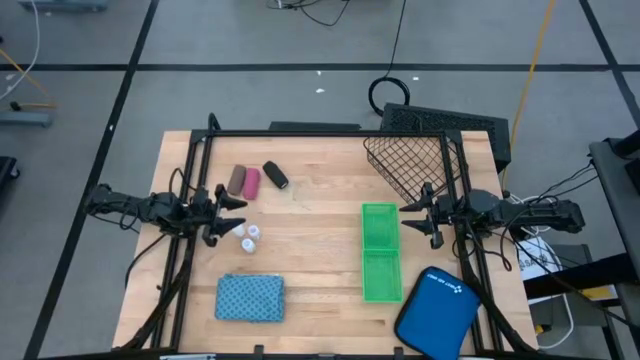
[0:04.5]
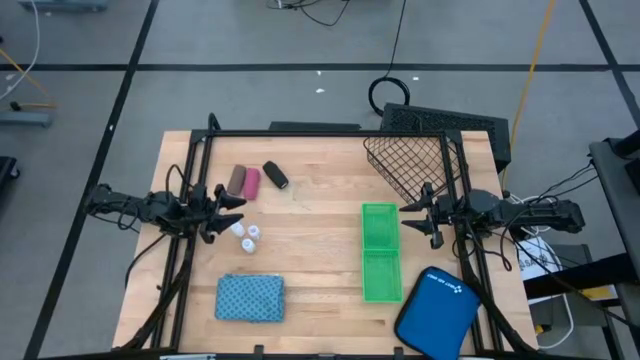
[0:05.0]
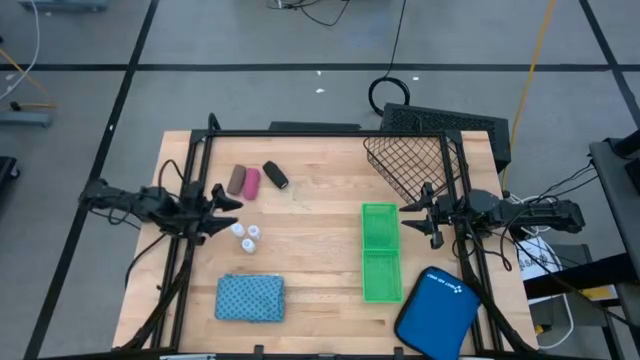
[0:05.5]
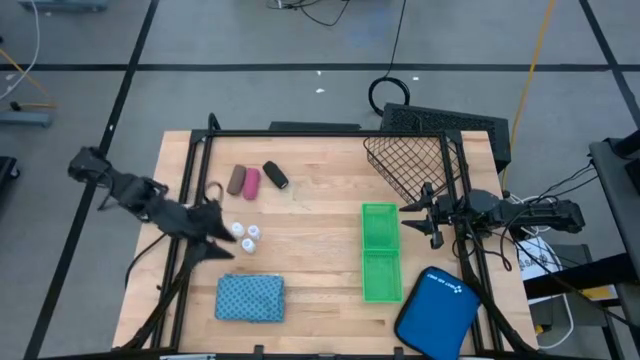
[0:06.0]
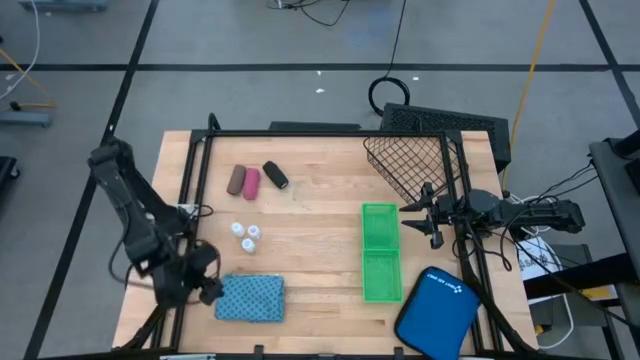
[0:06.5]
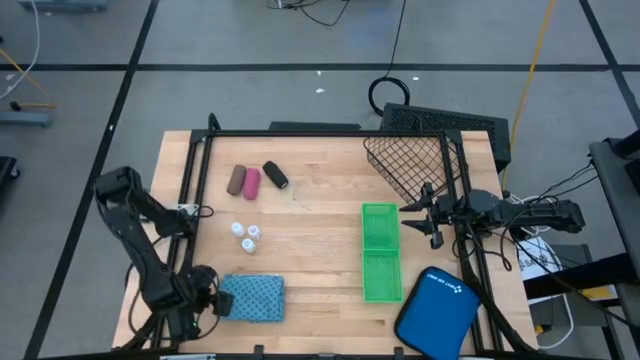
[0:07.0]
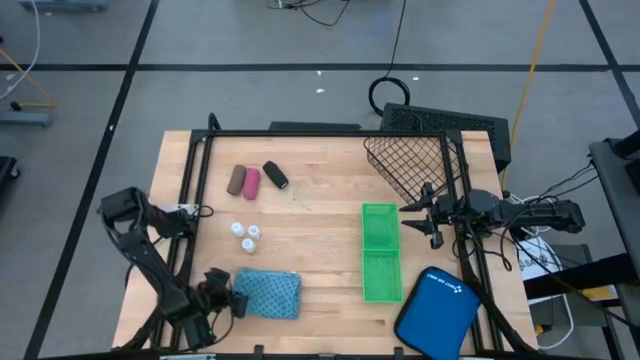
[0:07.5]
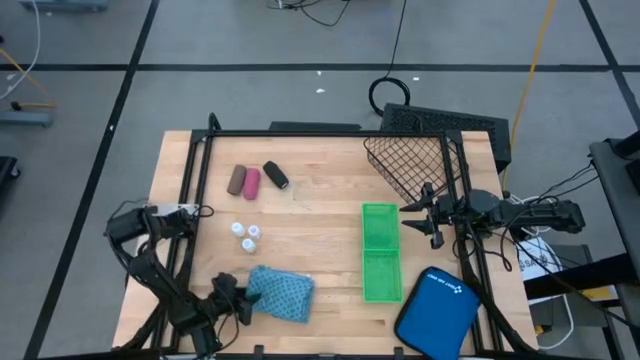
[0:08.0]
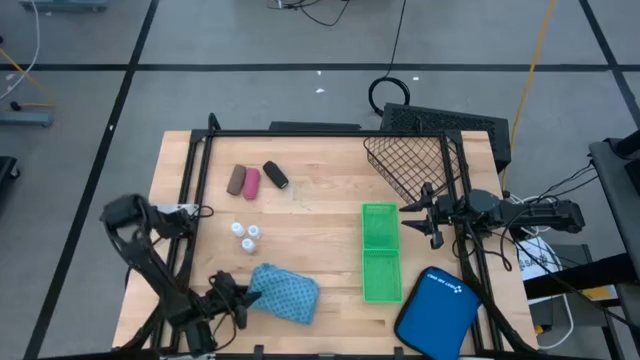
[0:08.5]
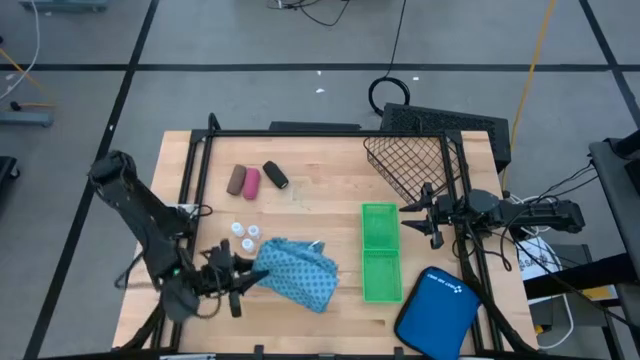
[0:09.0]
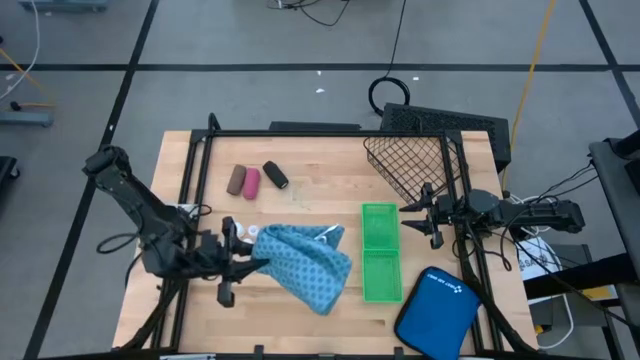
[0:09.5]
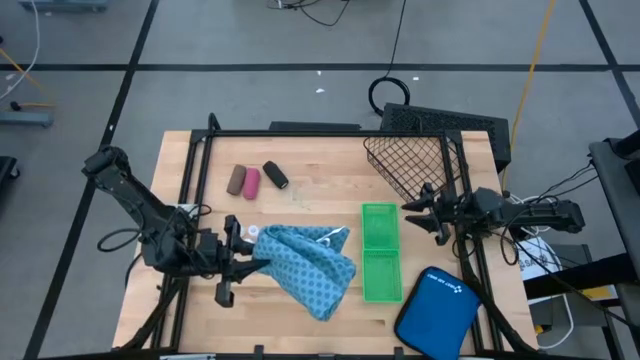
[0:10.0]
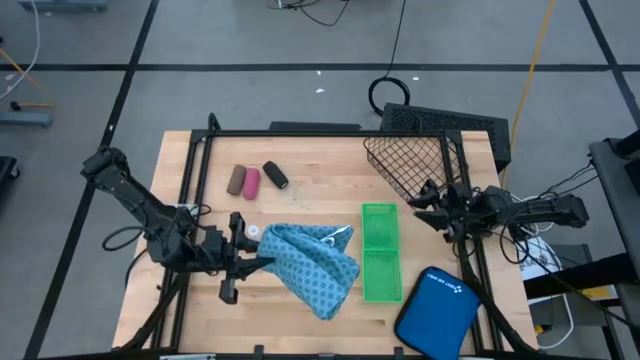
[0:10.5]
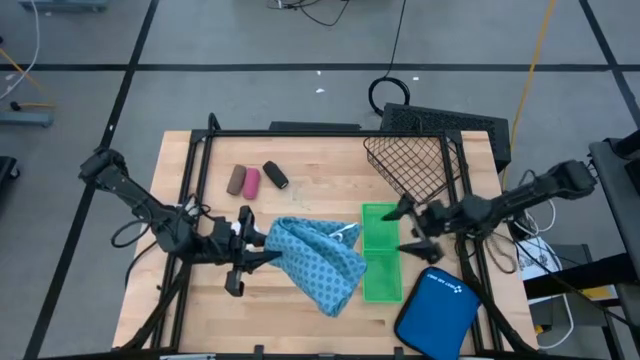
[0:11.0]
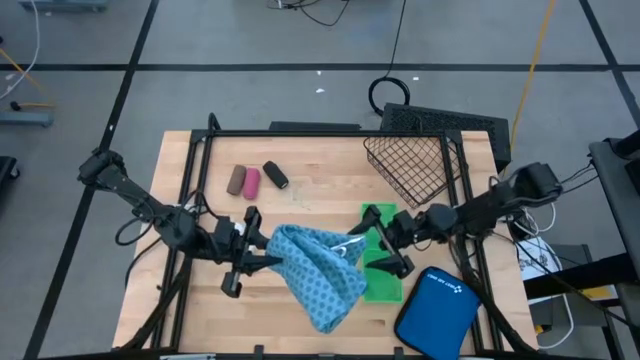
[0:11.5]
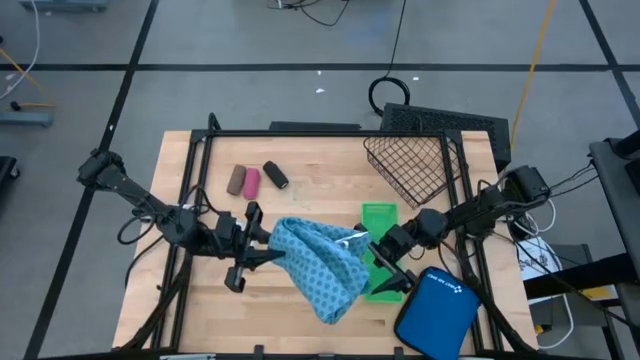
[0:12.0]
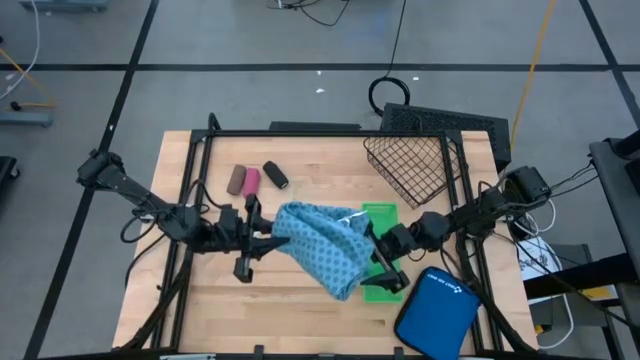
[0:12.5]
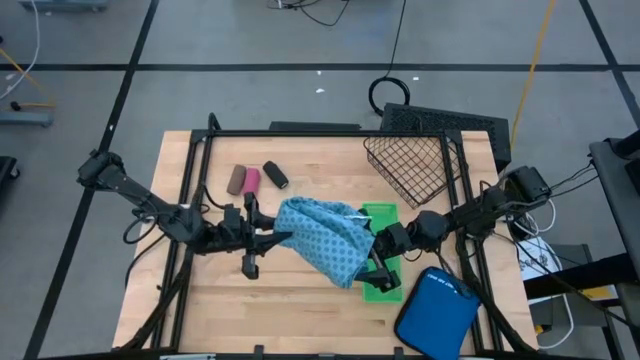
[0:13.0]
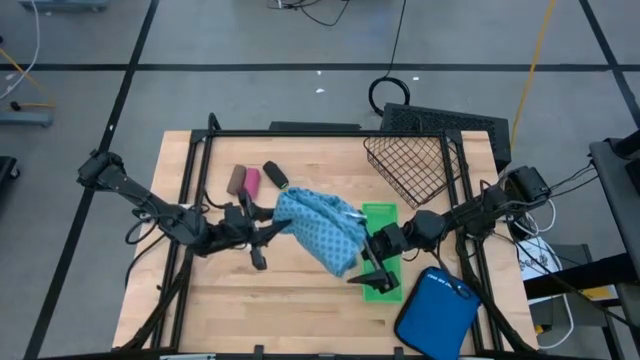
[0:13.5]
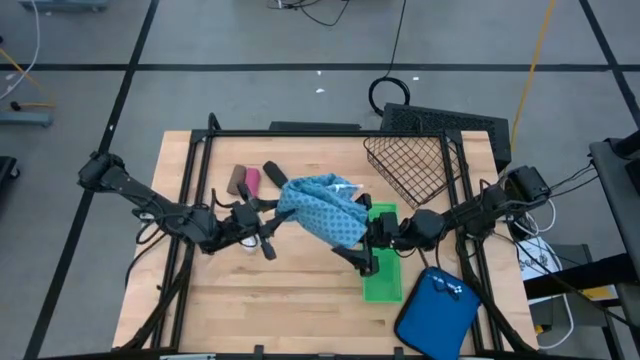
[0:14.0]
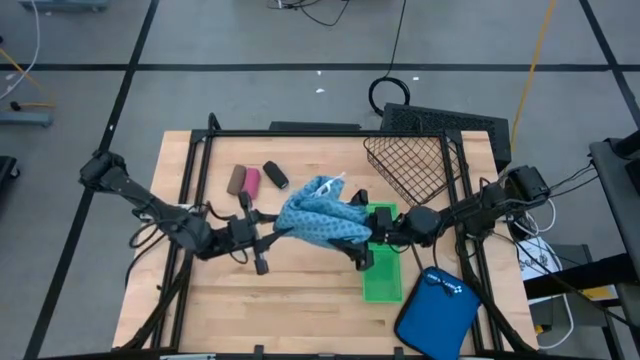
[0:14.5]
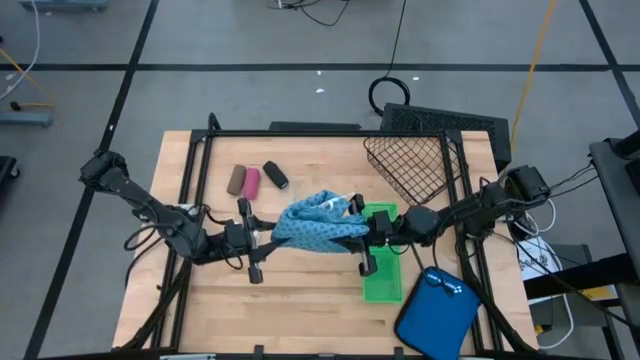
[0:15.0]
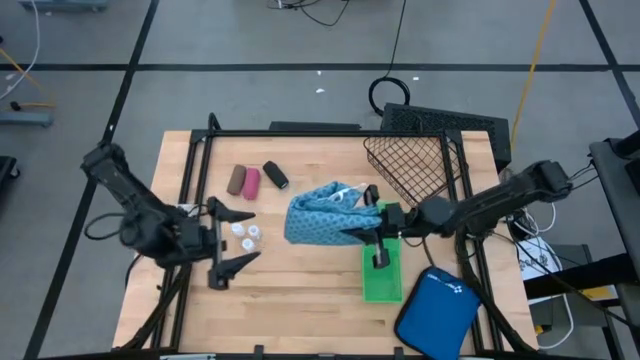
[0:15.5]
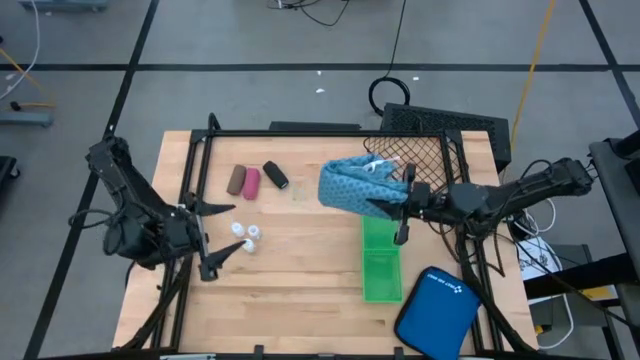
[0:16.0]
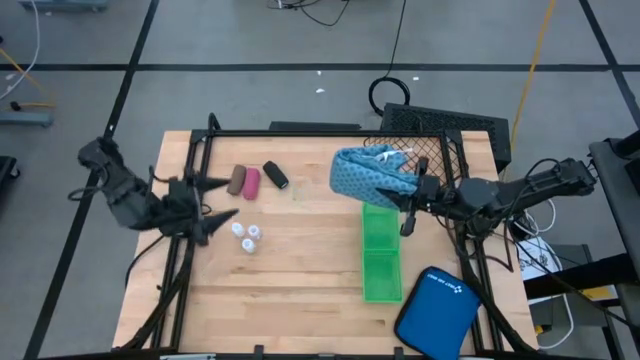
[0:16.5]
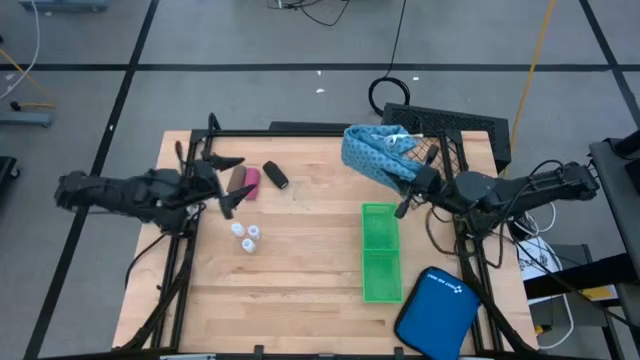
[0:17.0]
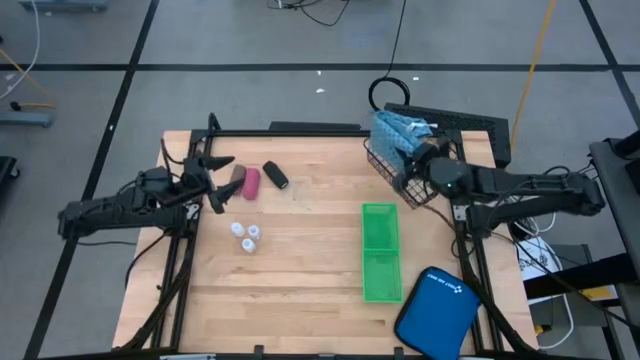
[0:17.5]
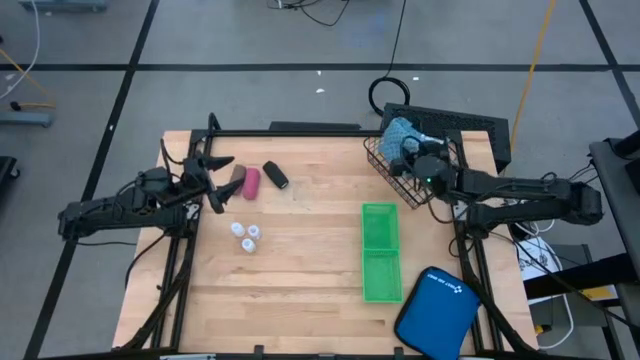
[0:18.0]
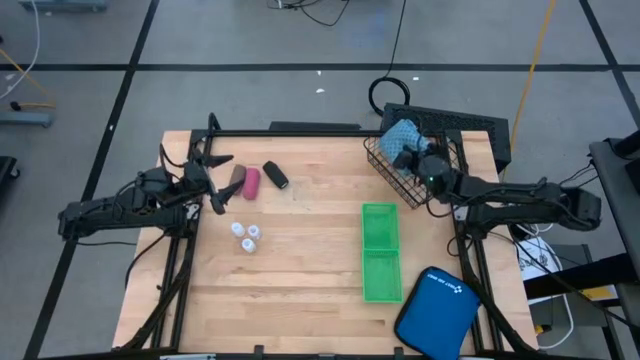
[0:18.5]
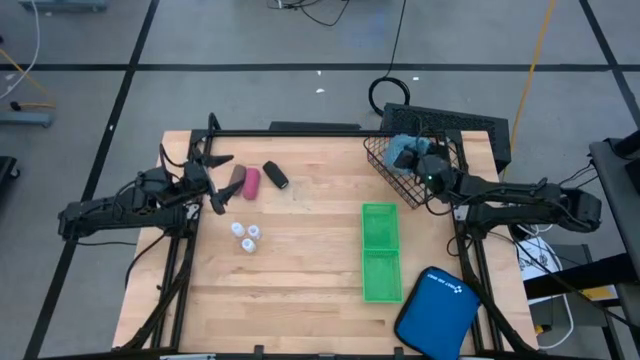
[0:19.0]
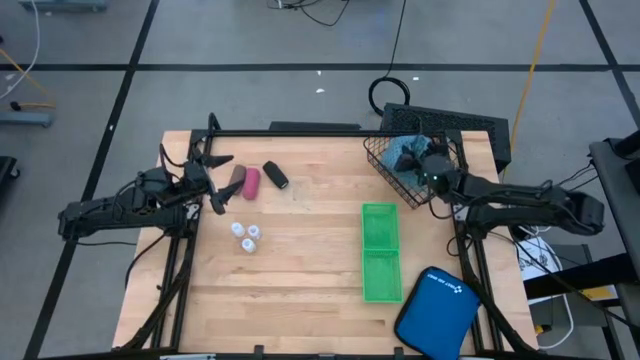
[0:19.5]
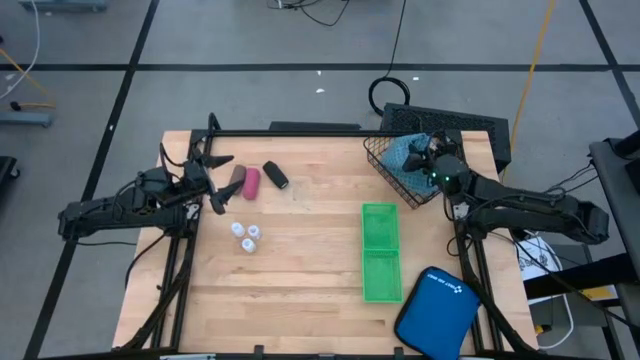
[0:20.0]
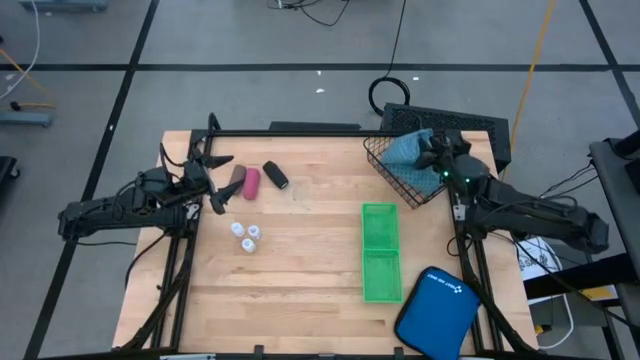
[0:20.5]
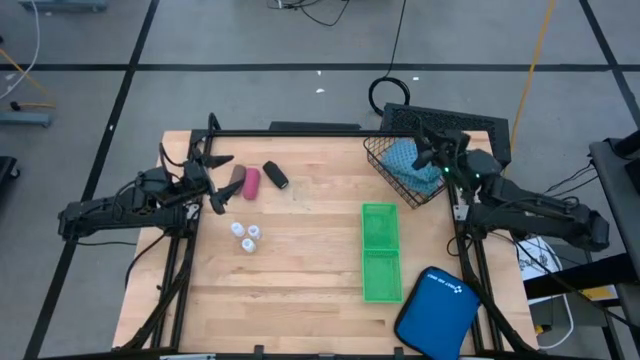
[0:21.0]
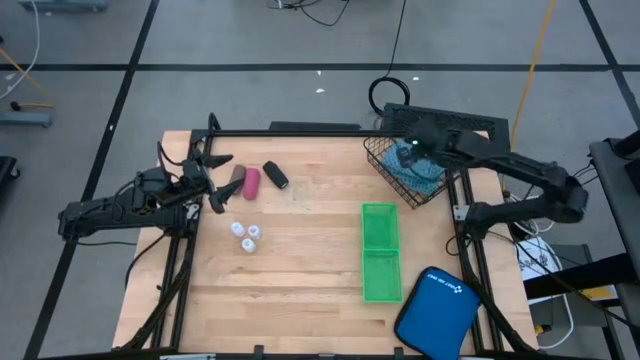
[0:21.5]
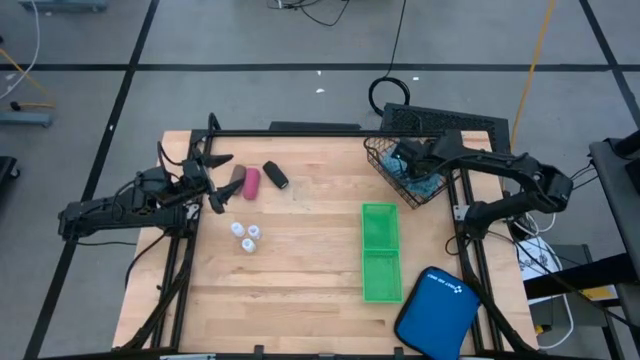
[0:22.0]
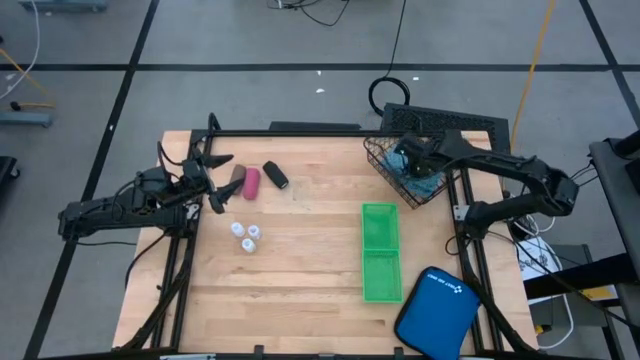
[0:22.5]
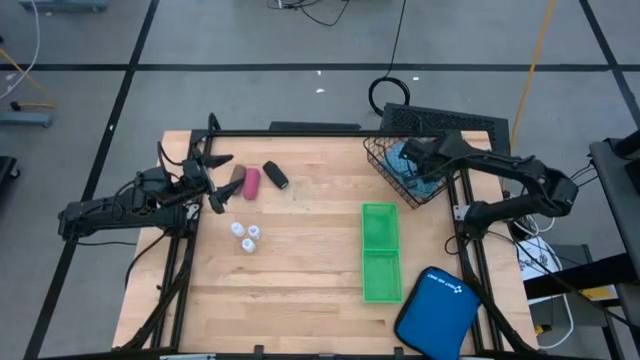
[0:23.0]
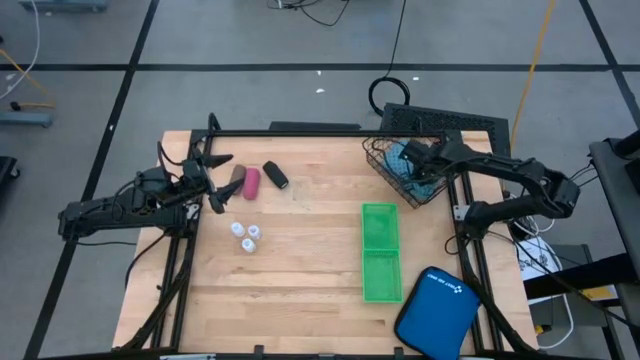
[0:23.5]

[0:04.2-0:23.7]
Task: Pick & Place Medicine items
Put the blue patient gown into the black wire basket
